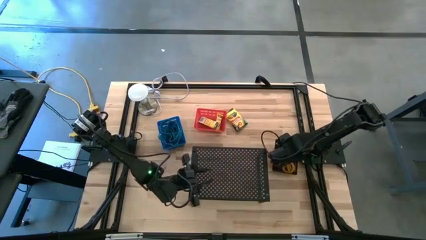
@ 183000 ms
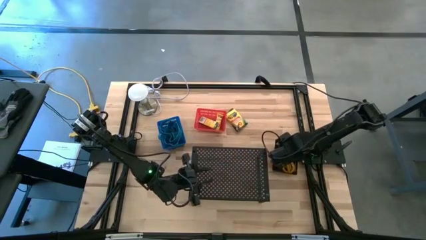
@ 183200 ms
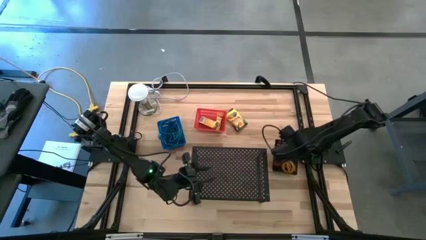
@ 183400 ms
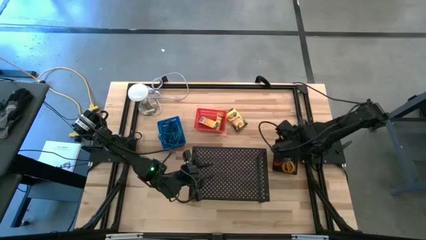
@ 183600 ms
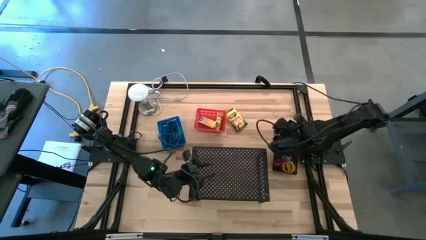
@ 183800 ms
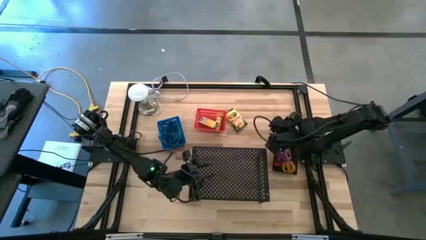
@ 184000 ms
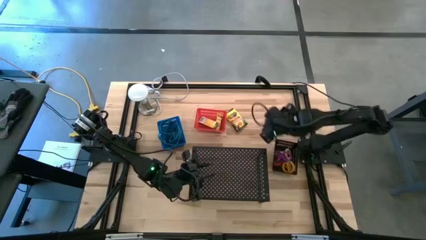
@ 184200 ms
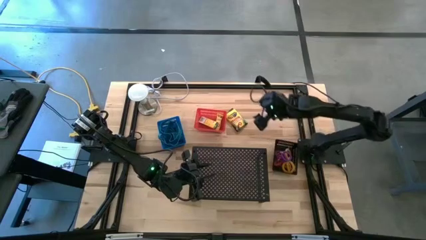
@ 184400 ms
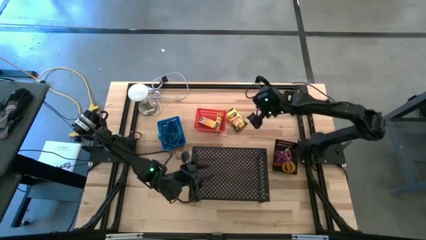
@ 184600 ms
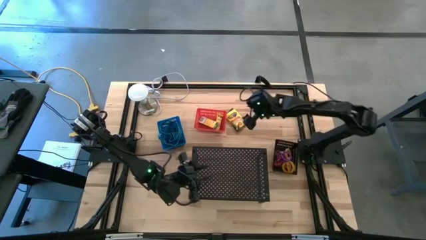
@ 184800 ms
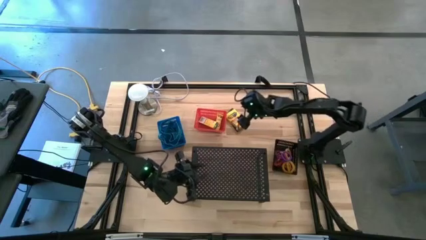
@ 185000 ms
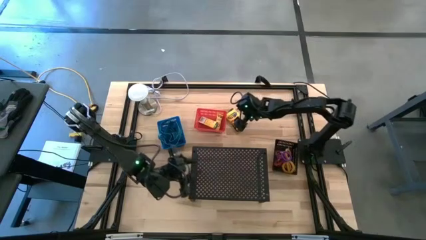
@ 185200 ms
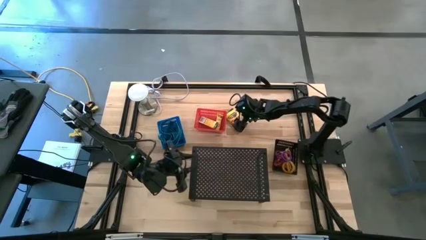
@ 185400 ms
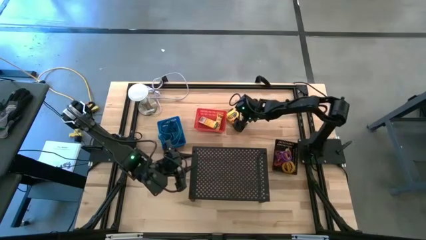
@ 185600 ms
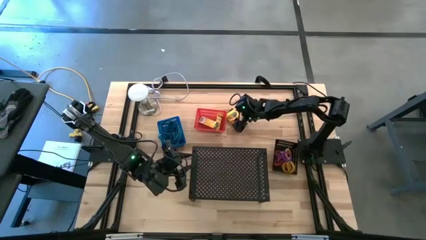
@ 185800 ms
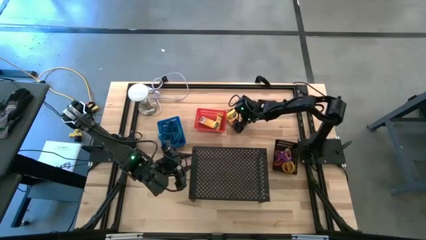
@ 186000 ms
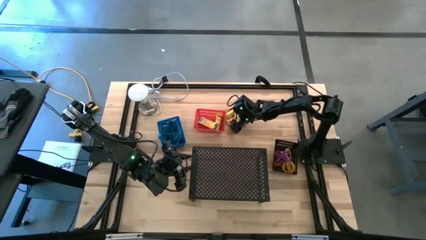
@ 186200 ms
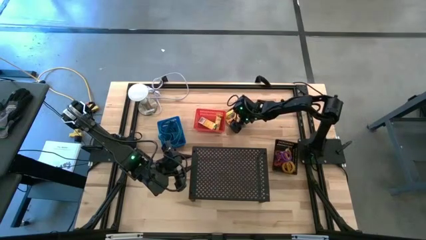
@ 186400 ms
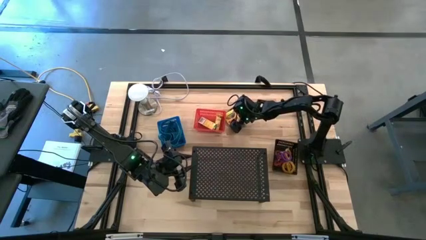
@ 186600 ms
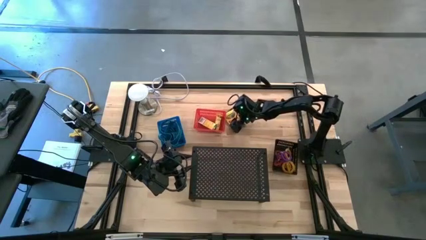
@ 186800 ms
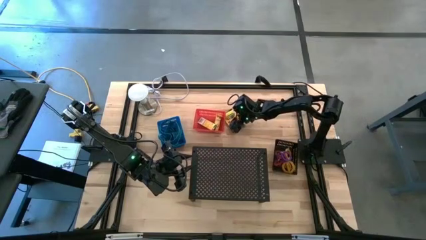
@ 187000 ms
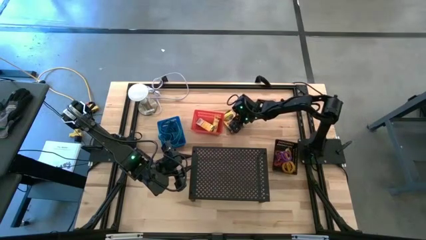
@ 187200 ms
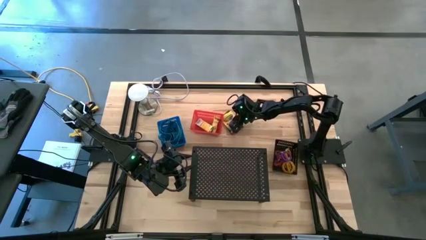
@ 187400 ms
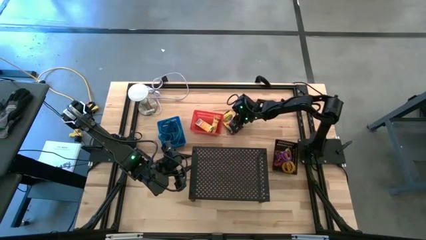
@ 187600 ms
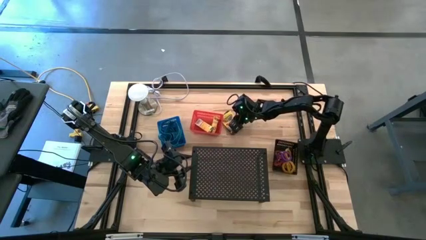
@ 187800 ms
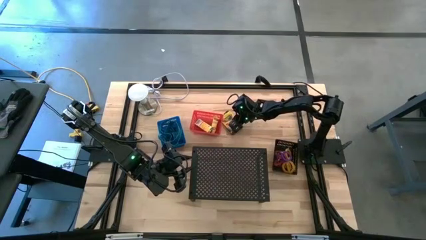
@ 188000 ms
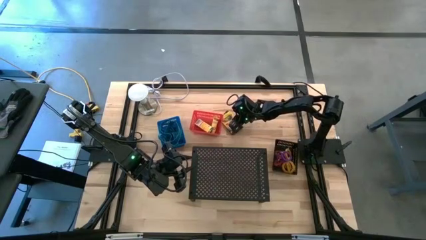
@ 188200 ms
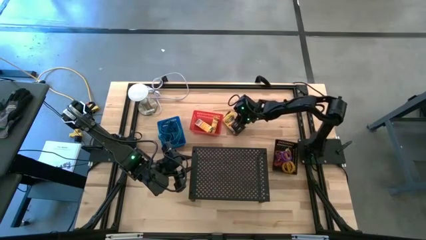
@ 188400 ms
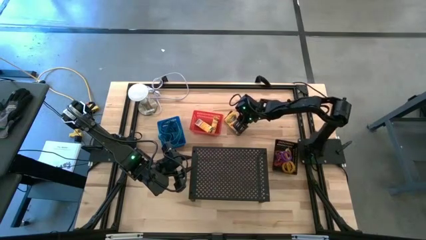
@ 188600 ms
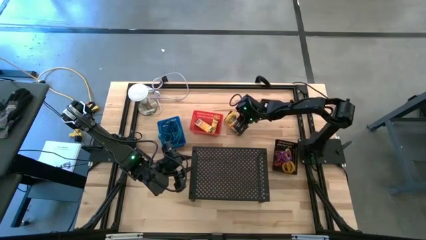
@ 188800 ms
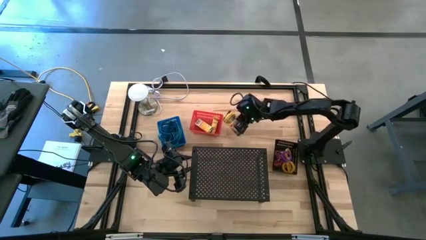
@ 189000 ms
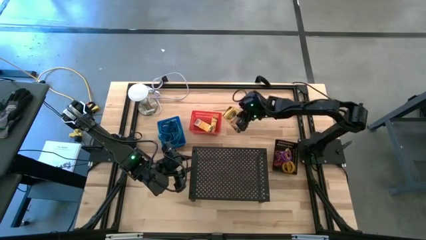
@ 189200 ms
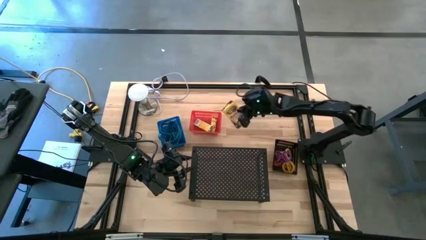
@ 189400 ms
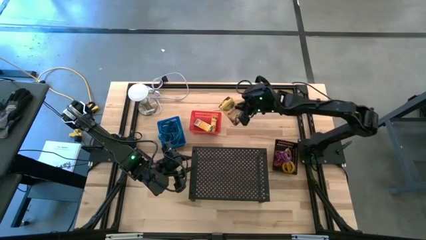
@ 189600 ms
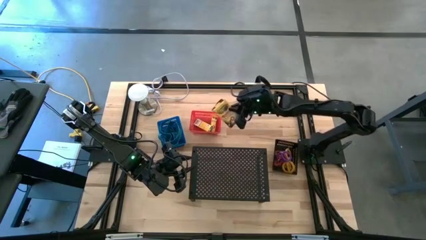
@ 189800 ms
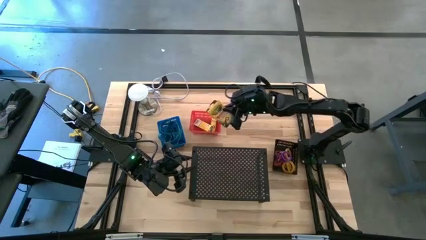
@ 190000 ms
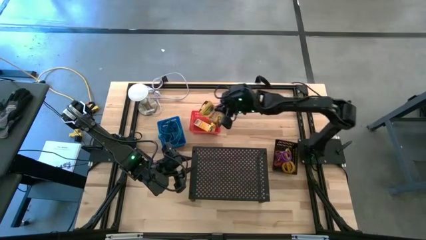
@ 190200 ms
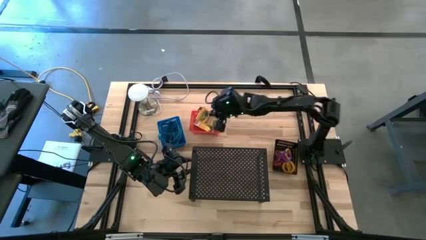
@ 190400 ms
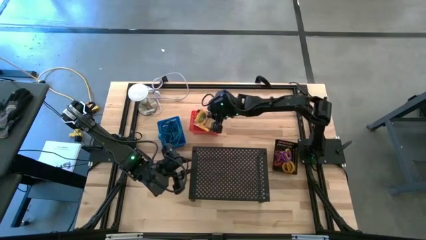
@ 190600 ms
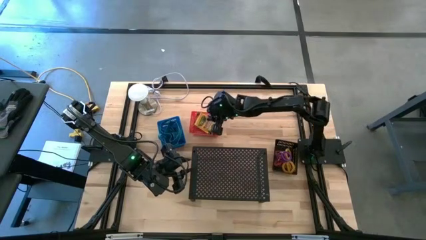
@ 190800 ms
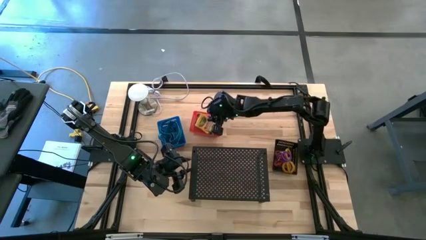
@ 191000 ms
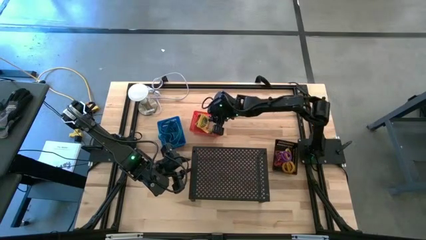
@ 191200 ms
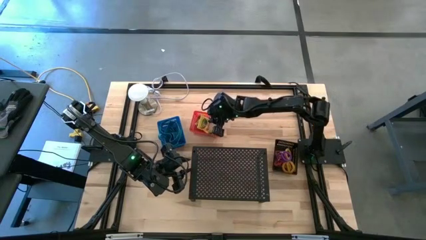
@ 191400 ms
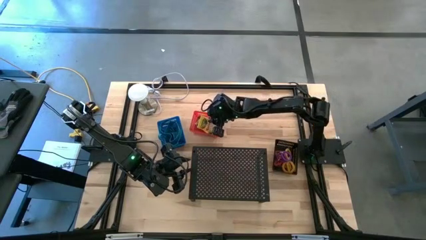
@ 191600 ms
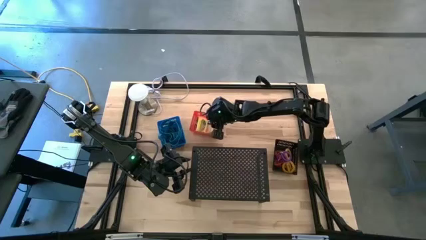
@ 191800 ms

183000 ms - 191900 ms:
Task: Pick & Place Office Desk Supplies
Put the yellow crayon box into the red bin

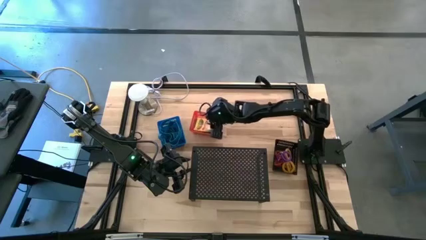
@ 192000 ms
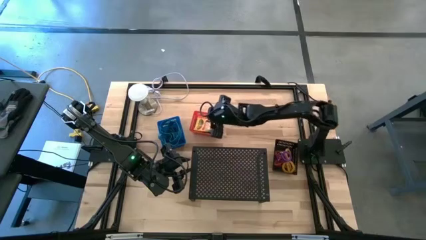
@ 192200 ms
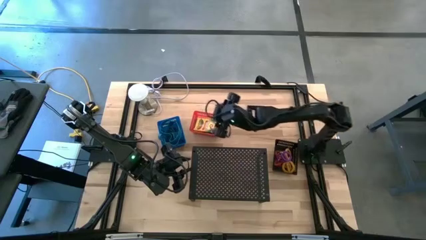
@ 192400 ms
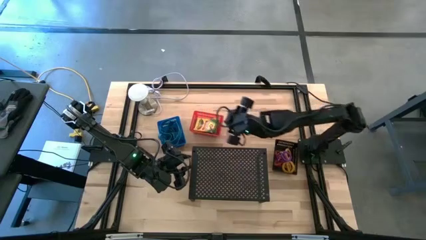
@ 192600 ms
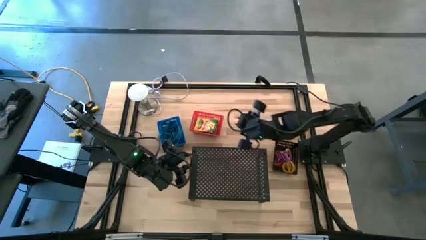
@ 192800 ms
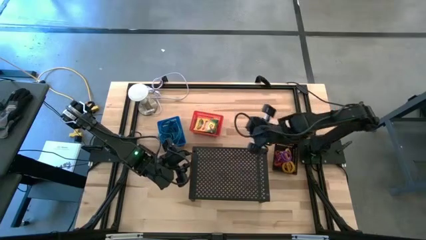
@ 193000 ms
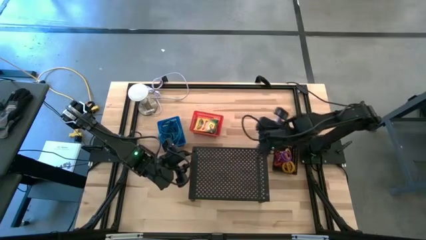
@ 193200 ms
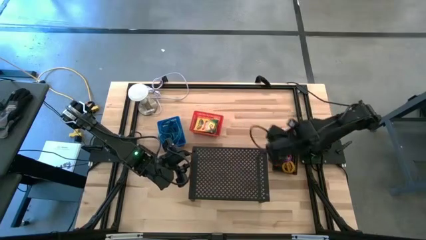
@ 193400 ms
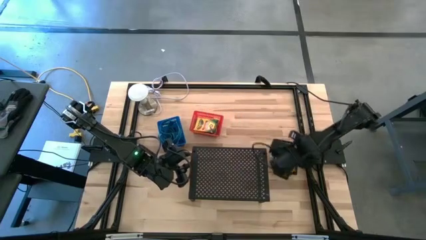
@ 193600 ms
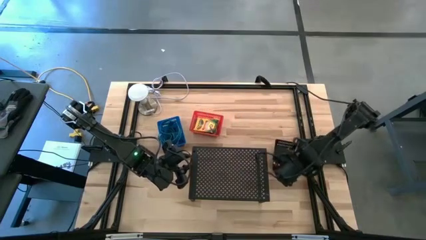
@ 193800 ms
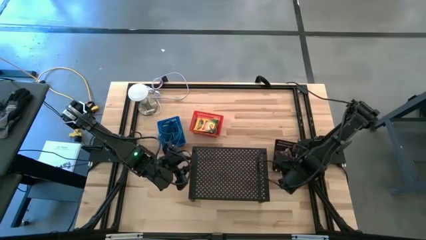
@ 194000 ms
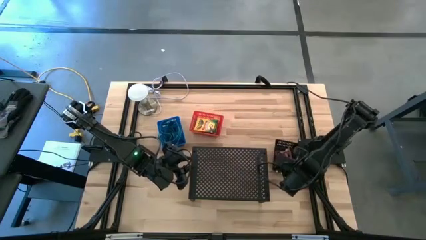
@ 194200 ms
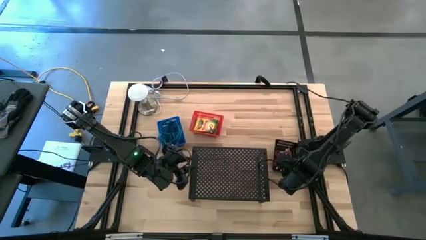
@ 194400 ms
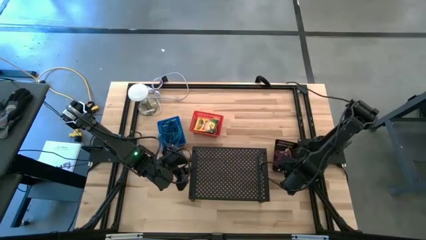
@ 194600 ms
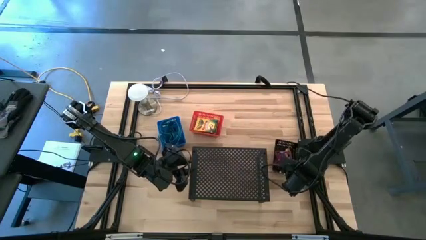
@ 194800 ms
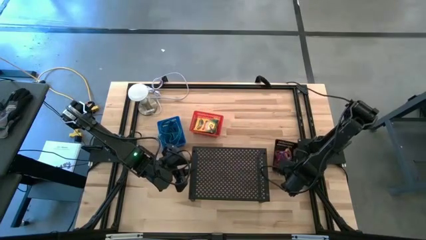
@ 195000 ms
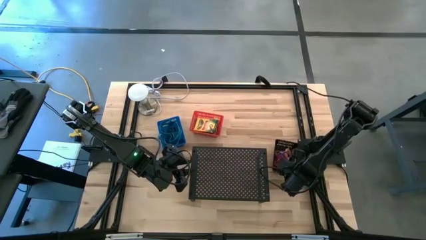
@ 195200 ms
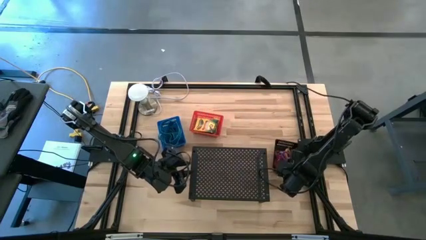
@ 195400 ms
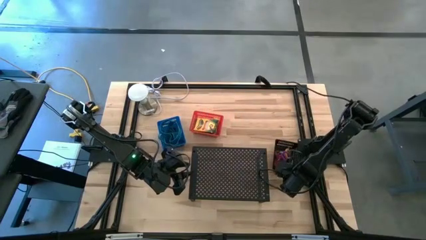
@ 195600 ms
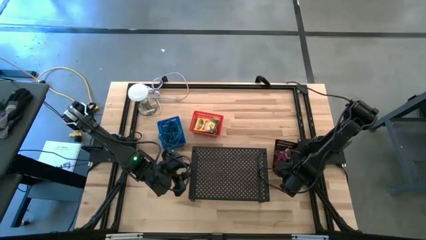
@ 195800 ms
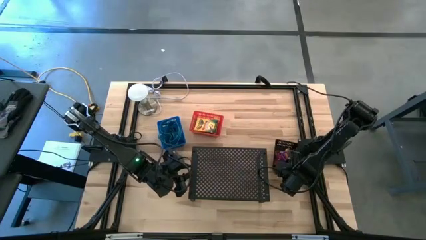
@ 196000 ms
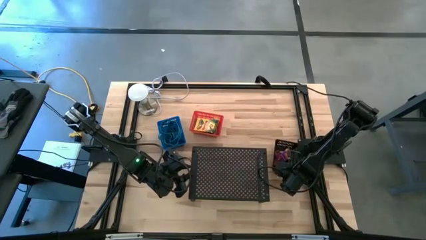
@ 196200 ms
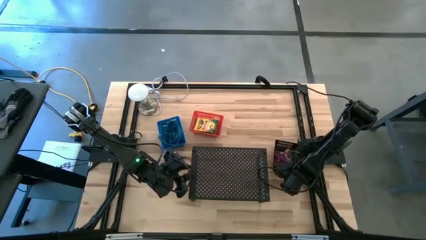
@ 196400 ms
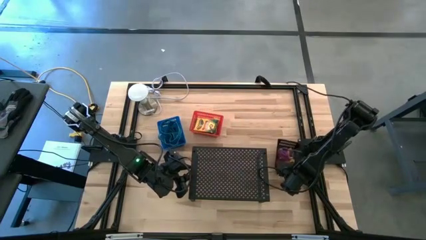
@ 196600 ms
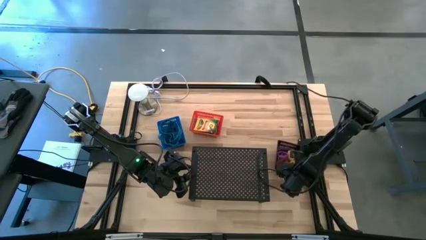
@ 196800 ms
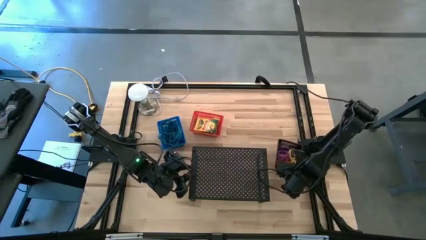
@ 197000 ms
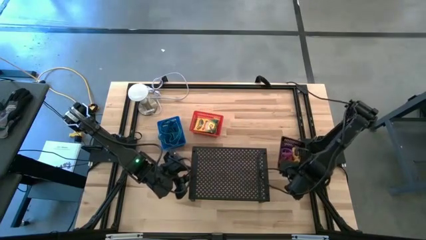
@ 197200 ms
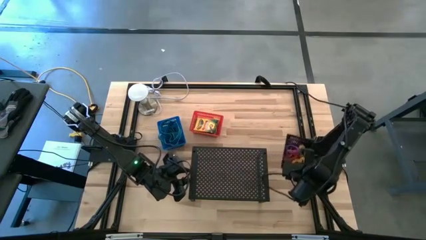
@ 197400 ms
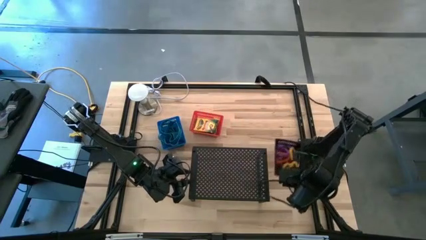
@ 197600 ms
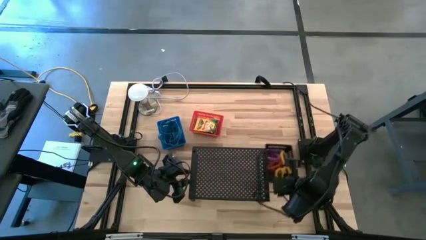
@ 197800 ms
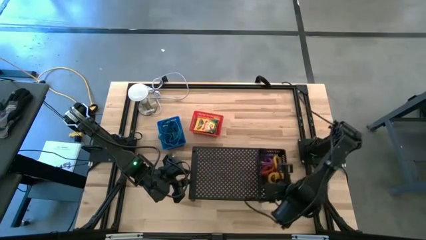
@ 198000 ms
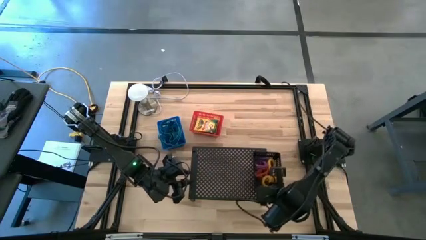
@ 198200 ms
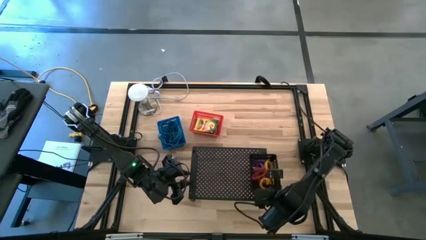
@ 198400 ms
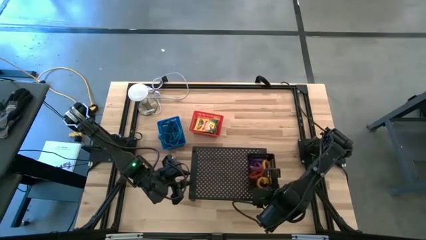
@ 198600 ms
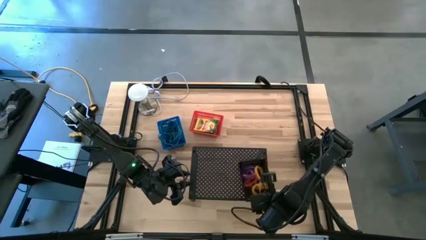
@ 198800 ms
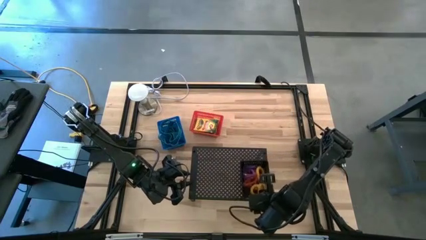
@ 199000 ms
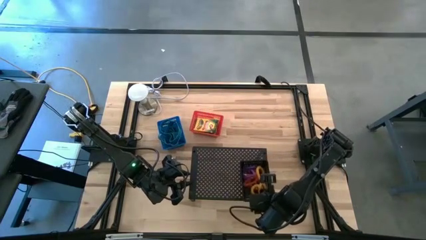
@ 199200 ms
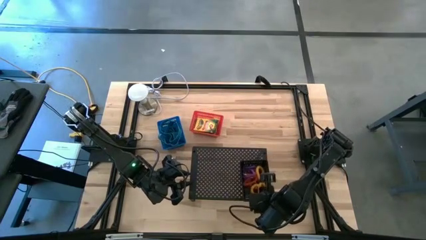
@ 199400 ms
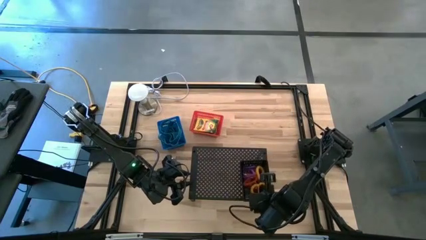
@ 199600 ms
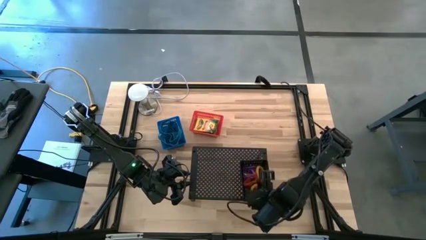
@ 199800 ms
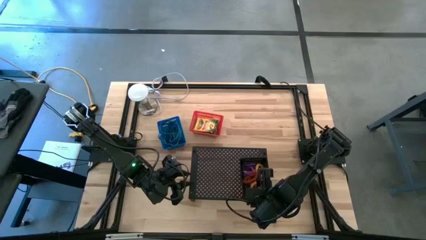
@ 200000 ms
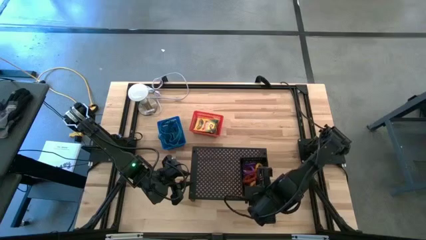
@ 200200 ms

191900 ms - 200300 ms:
Put the black bin with the spring keychains on the shelf
